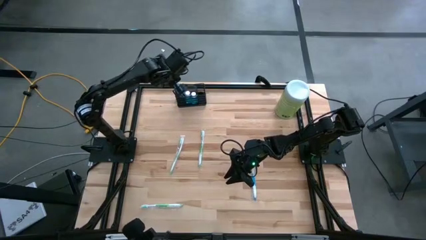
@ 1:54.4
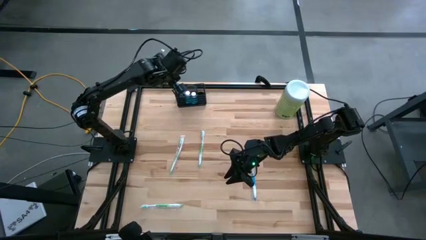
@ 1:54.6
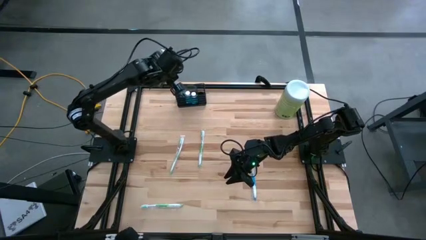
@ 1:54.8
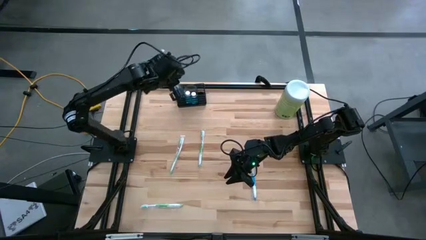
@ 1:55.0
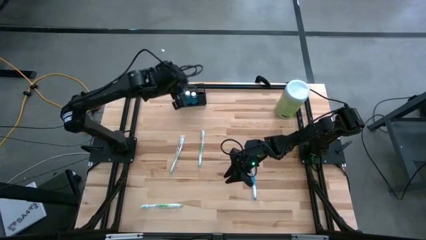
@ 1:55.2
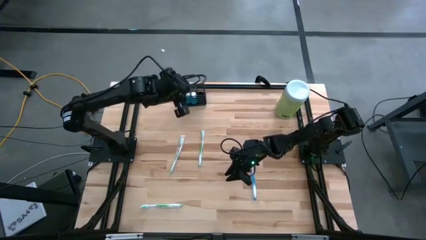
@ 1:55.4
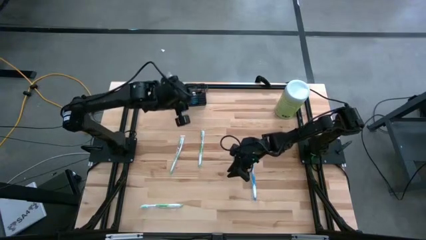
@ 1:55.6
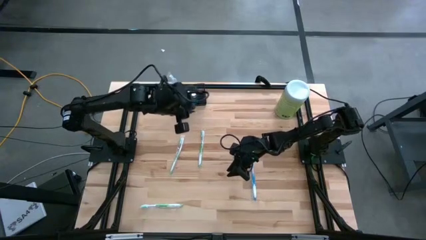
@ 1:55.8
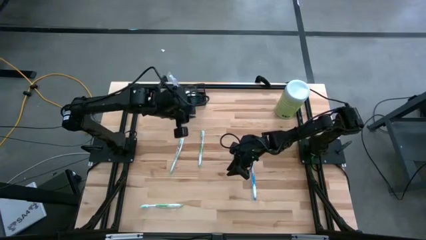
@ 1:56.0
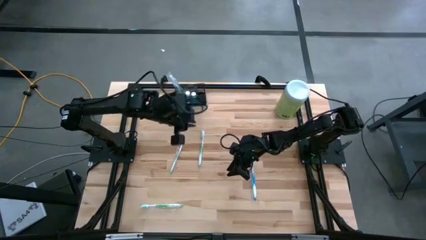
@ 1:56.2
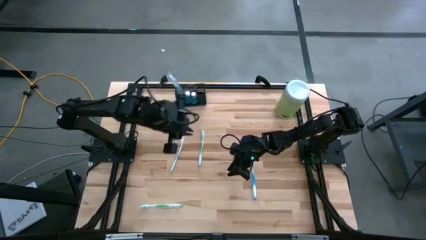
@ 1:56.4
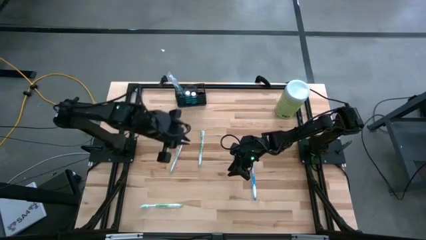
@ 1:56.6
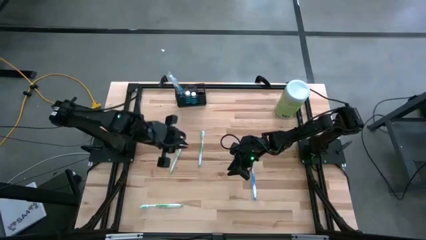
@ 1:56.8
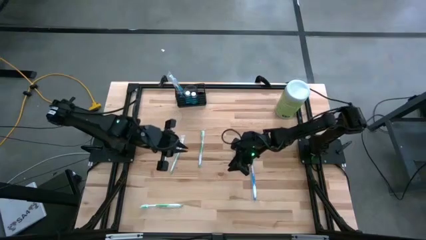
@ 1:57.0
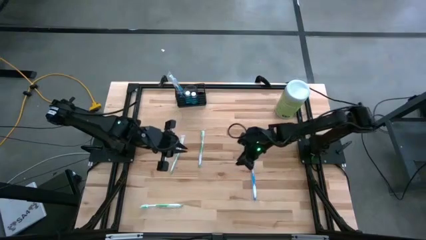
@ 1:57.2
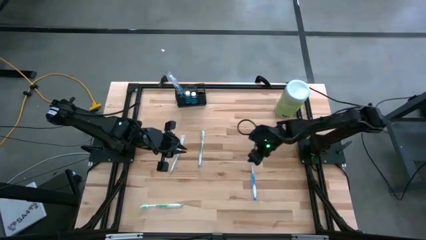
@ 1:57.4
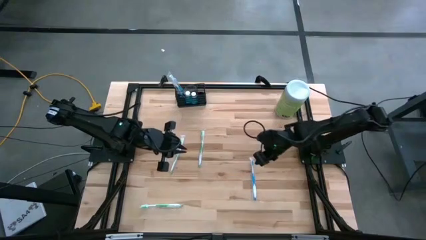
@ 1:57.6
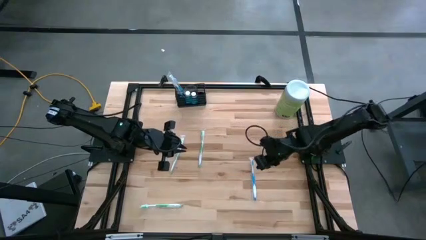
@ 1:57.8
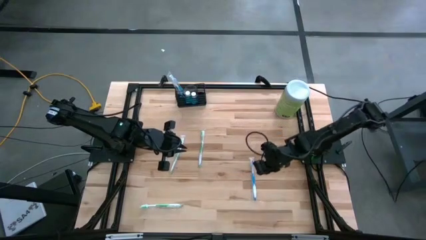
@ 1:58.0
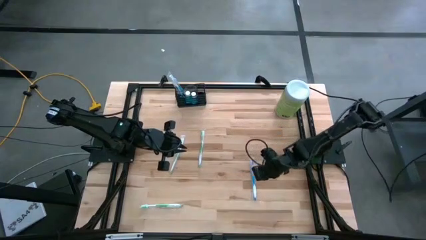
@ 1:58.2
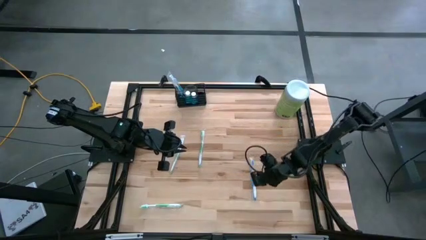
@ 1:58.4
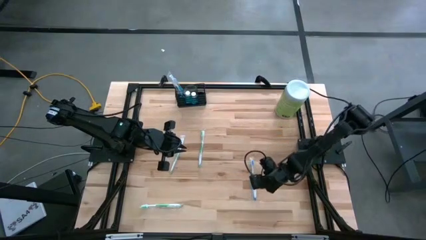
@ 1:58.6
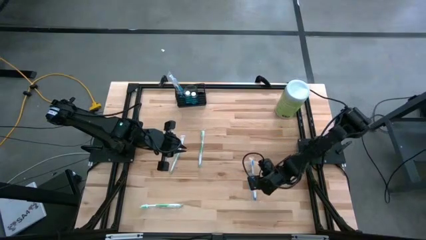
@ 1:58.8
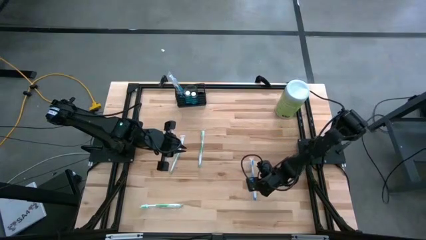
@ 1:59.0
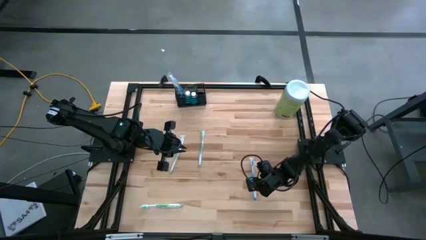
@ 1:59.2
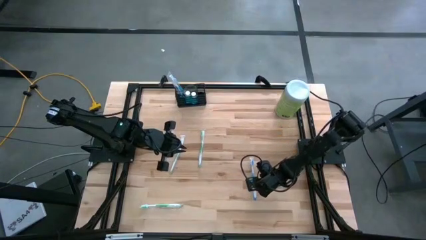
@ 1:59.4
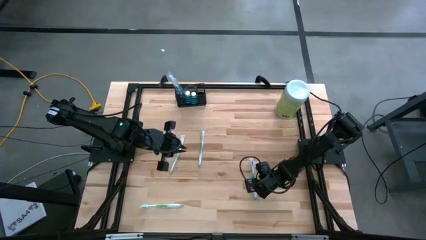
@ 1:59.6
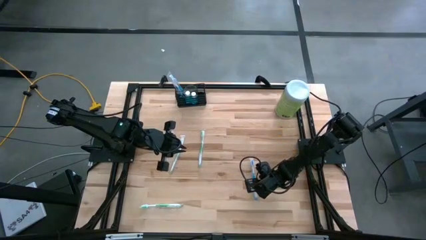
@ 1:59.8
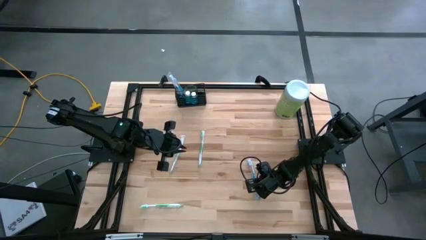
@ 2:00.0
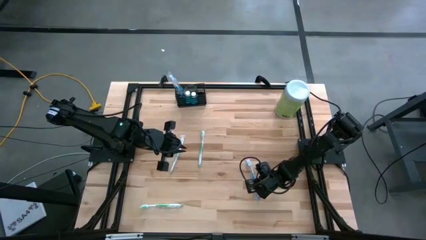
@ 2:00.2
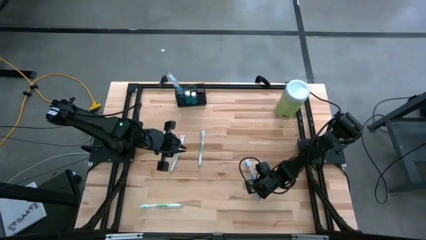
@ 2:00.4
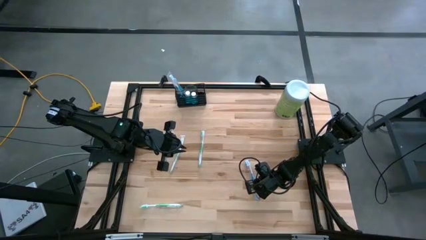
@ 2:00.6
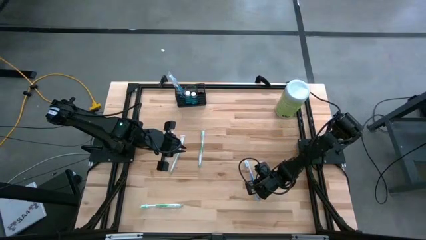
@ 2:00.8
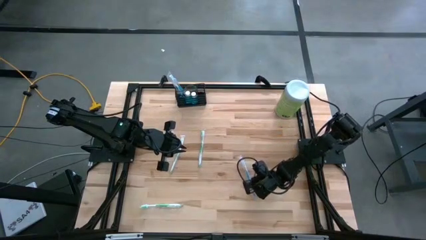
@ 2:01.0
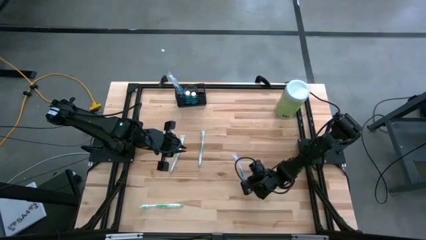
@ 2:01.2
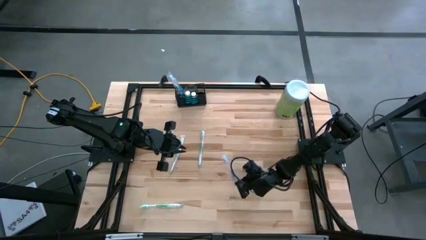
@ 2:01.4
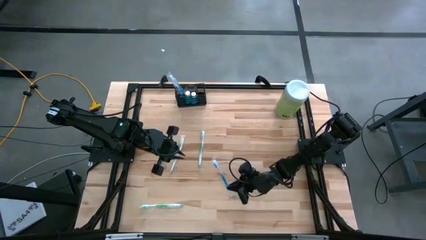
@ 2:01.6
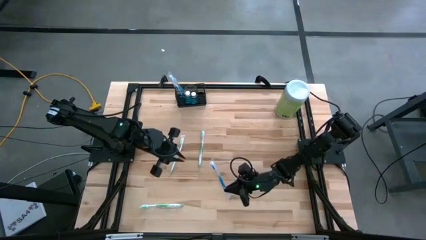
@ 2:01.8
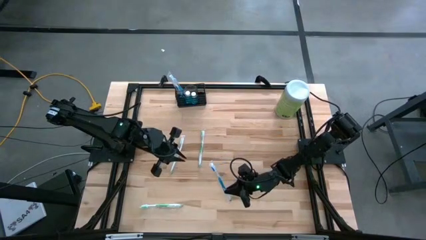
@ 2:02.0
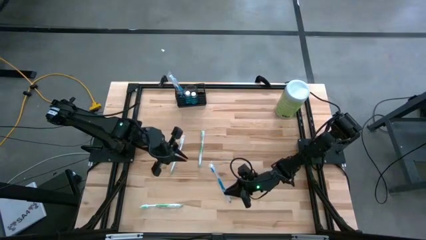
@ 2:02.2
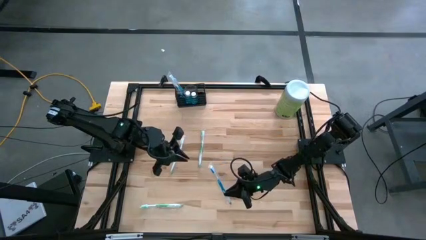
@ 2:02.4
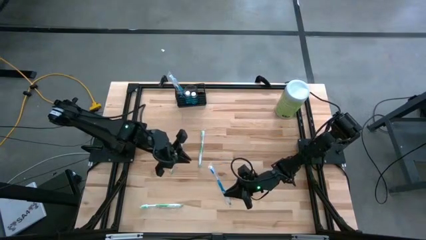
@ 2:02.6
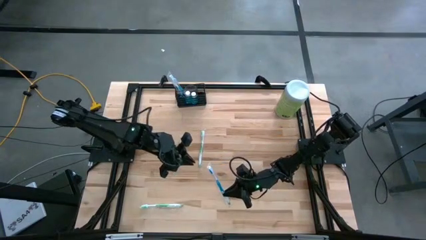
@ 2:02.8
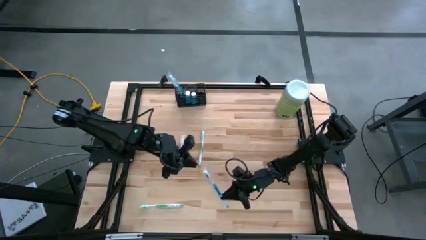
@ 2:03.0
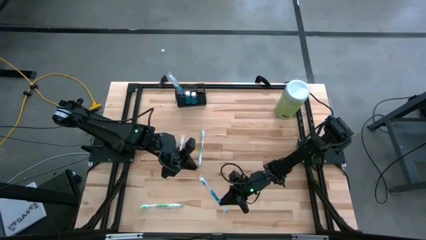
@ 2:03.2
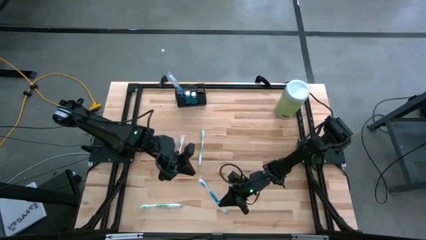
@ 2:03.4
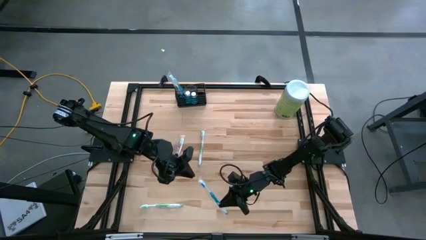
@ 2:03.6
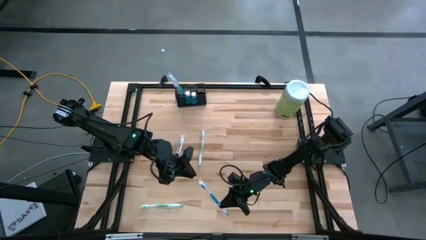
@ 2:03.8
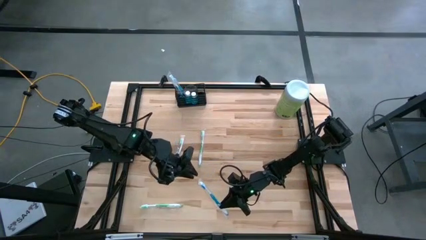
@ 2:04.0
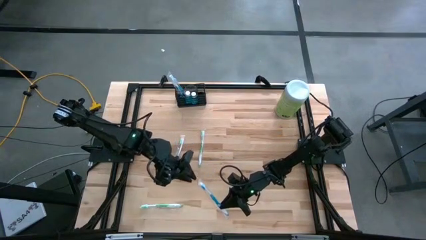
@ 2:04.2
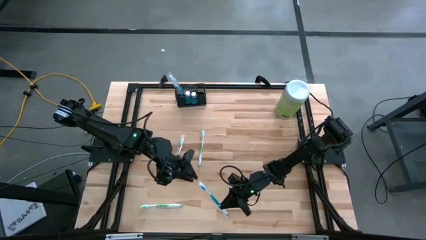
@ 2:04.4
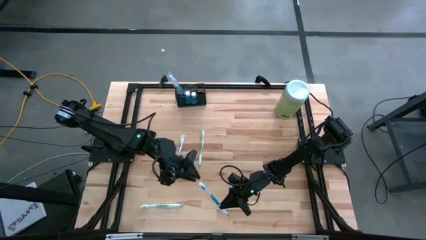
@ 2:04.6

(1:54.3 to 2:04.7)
Task: Pick & Place toothbrushing station
Put the blue toothbrush into the wire organizer
